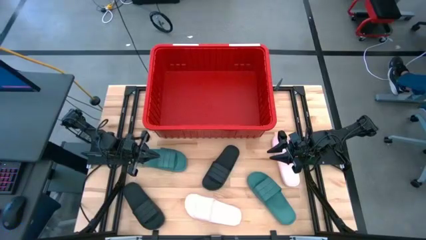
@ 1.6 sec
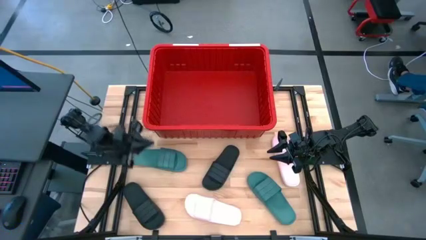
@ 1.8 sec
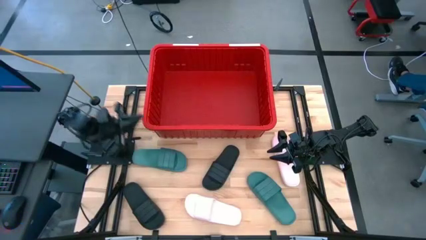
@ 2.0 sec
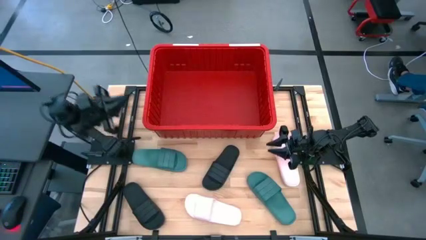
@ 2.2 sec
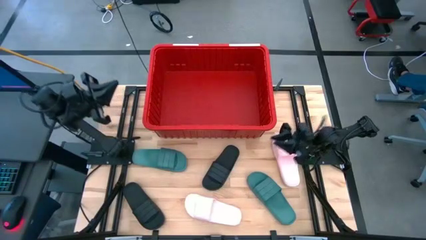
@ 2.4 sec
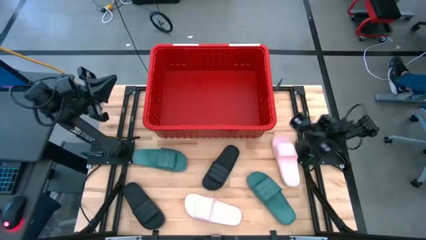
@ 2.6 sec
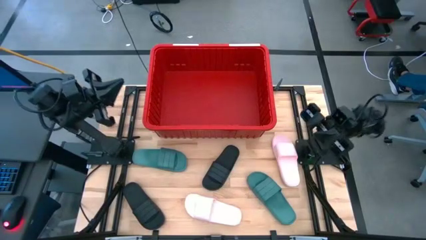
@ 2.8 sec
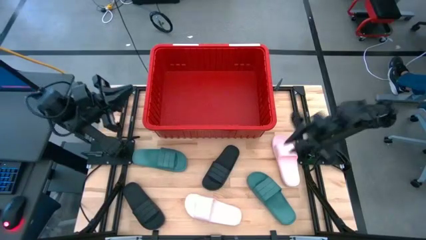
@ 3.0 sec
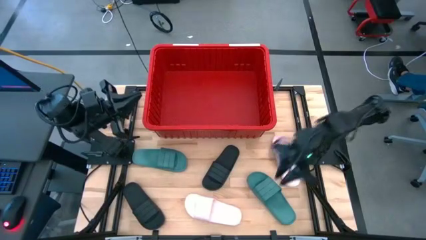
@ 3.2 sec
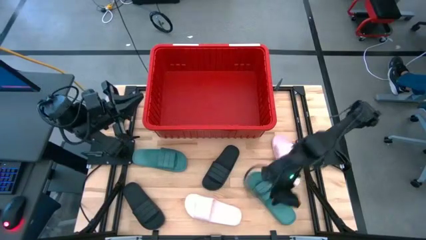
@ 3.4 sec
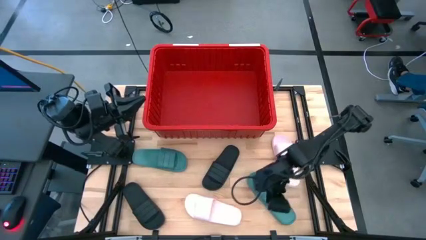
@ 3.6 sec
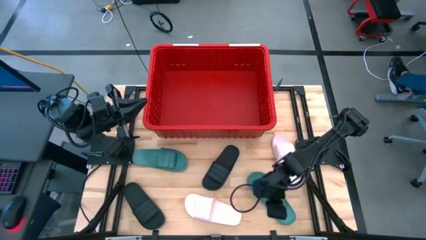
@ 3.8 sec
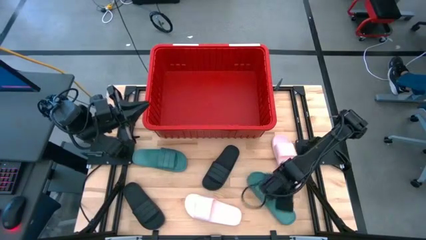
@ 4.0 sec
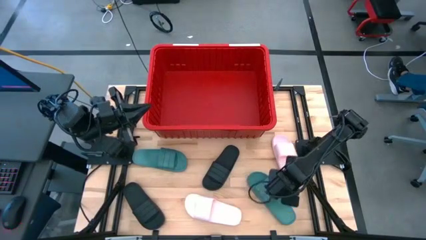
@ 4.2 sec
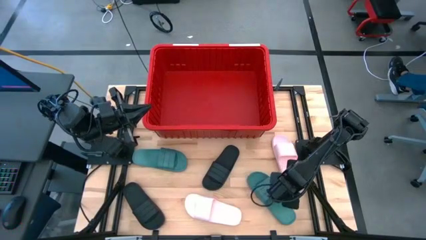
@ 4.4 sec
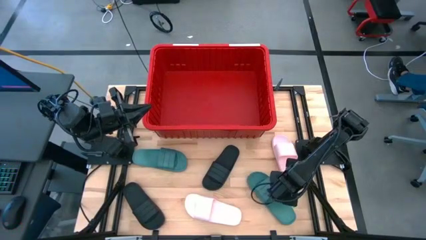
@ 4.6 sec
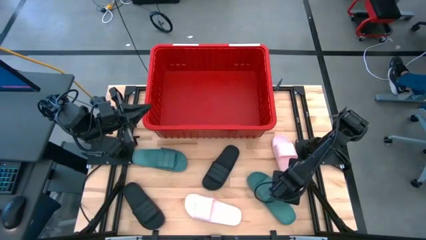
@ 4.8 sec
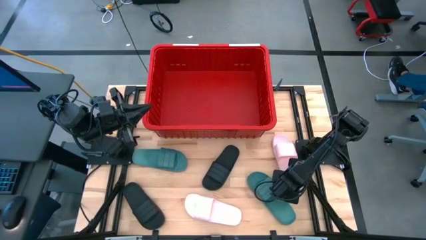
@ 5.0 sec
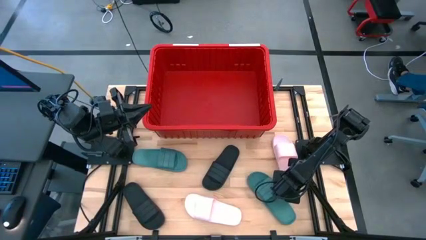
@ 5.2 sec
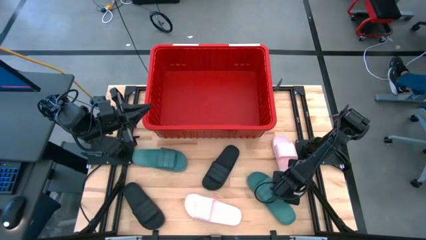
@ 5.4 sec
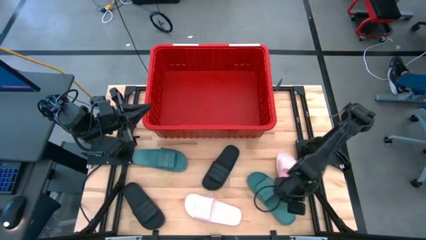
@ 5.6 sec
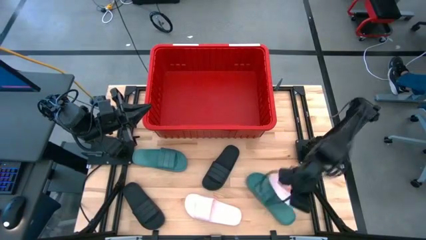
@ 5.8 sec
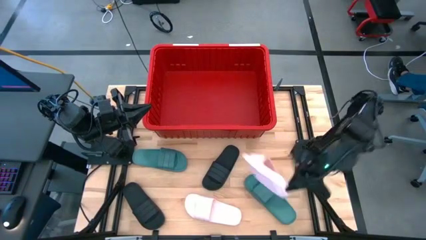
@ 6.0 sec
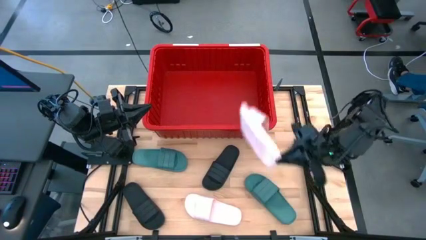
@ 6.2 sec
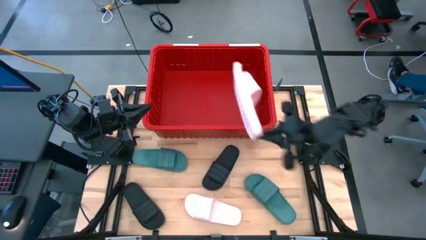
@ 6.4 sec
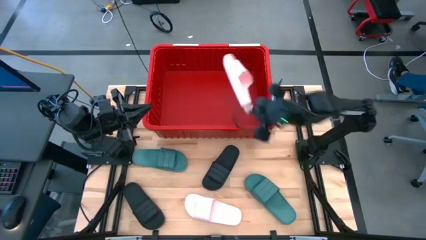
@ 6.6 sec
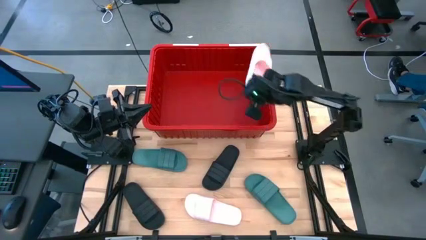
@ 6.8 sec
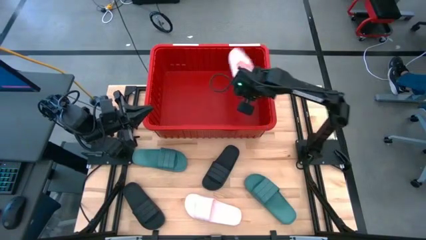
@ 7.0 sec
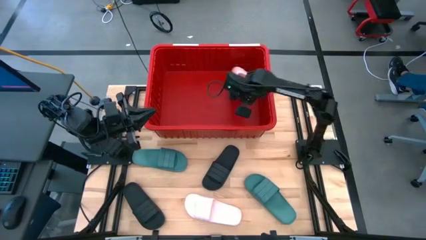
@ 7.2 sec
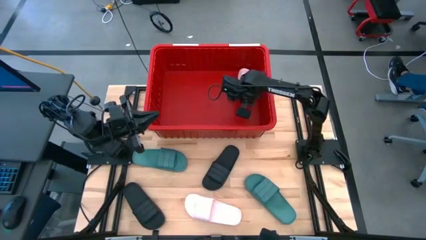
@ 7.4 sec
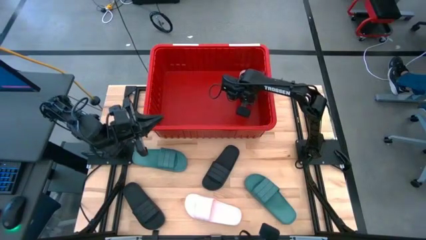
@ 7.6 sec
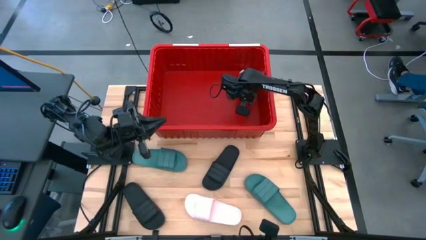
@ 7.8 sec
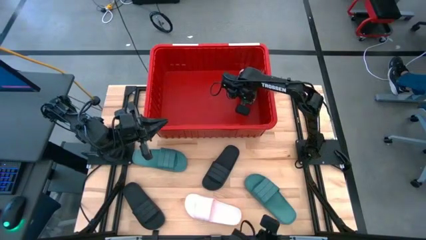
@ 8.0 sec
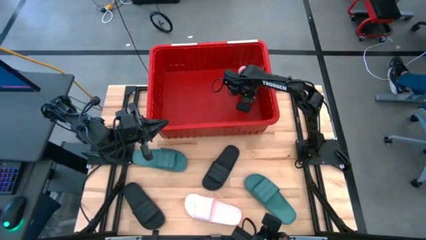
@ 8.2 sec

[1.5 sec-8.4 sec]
Task: Pick and place slides into bin
Put the top pink slide into the red container

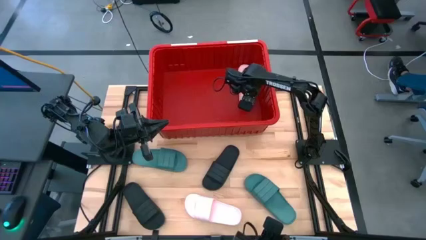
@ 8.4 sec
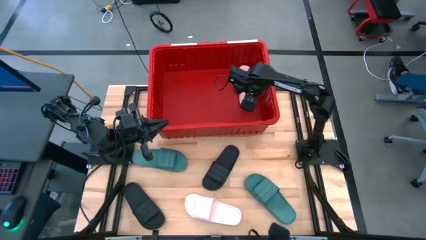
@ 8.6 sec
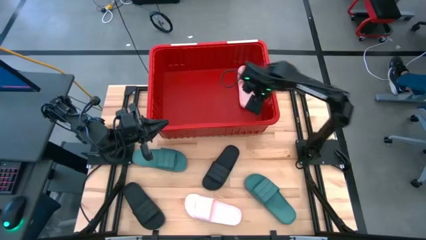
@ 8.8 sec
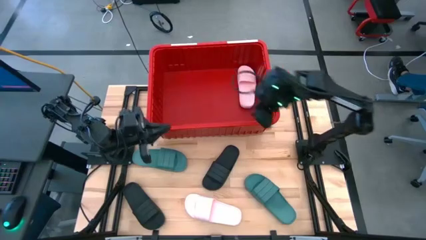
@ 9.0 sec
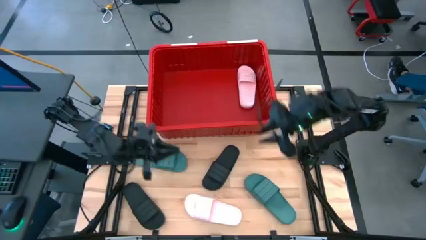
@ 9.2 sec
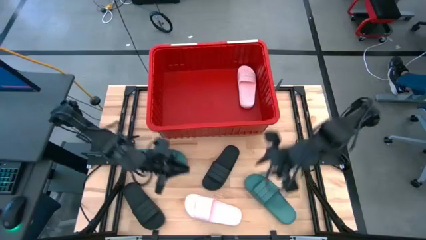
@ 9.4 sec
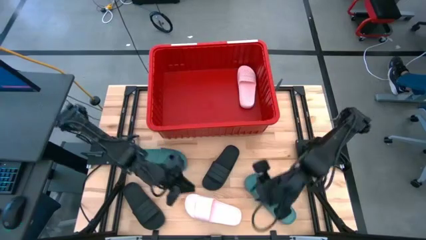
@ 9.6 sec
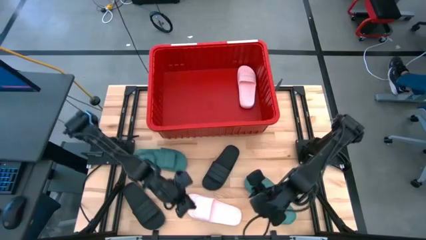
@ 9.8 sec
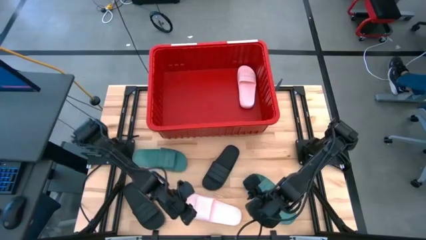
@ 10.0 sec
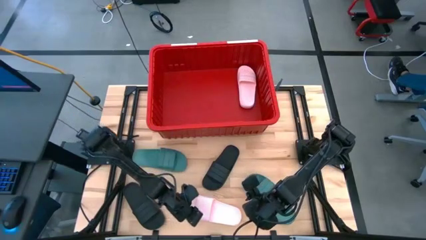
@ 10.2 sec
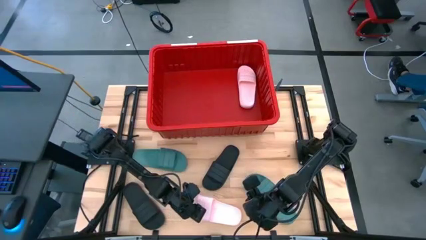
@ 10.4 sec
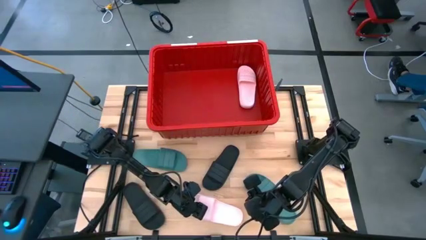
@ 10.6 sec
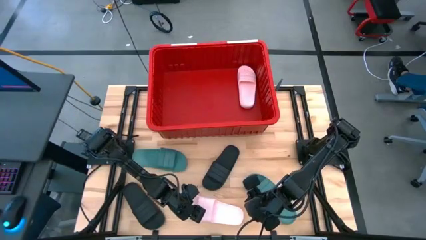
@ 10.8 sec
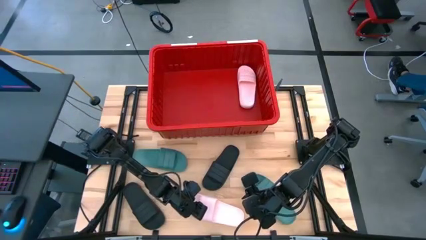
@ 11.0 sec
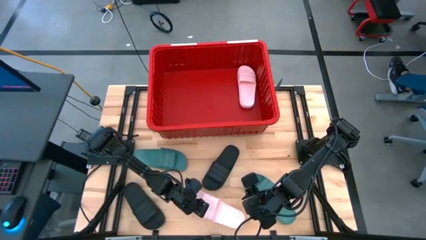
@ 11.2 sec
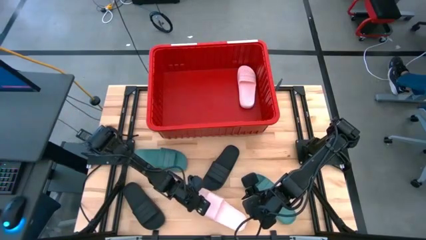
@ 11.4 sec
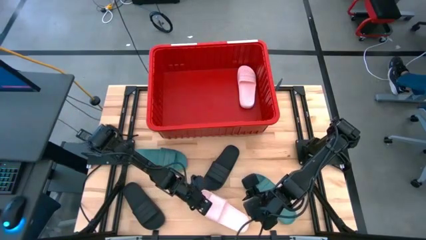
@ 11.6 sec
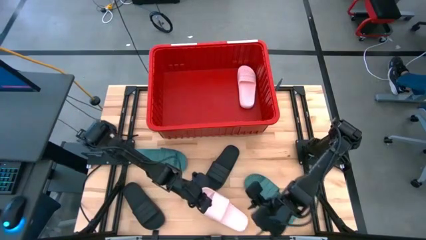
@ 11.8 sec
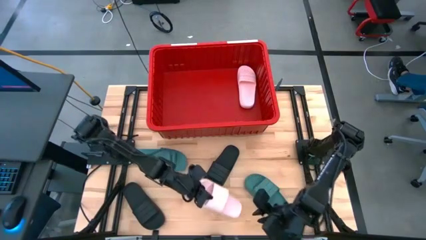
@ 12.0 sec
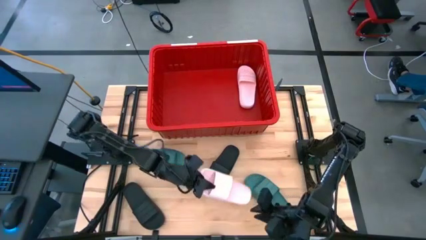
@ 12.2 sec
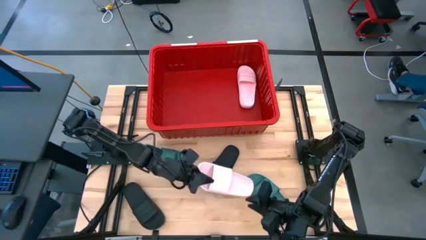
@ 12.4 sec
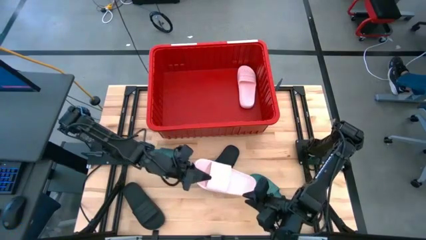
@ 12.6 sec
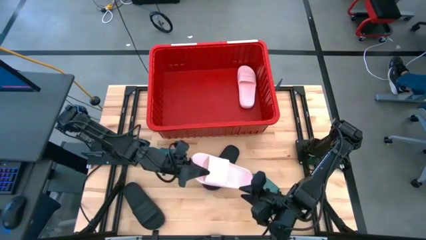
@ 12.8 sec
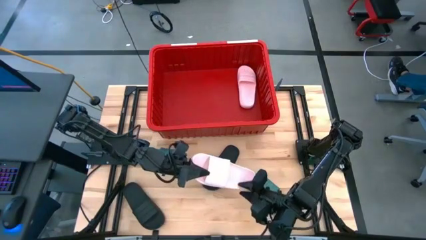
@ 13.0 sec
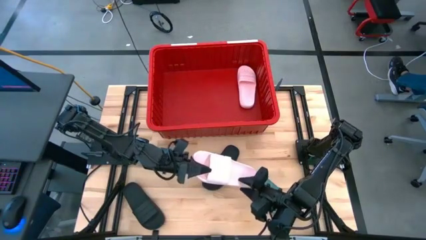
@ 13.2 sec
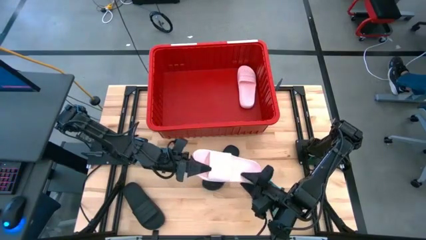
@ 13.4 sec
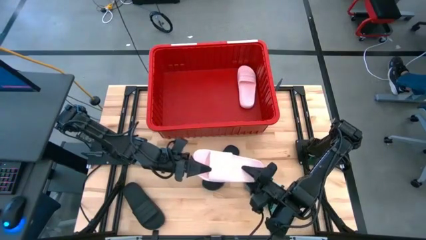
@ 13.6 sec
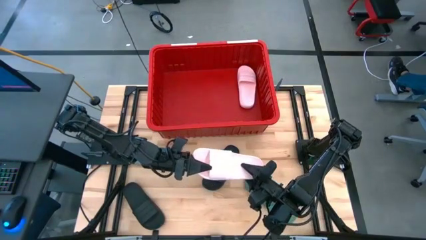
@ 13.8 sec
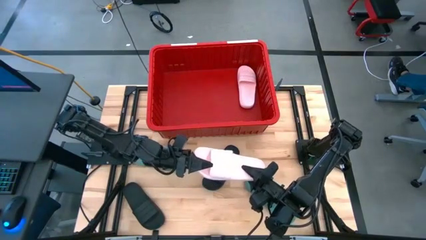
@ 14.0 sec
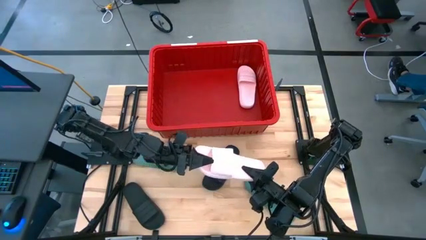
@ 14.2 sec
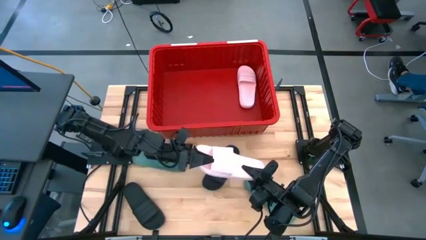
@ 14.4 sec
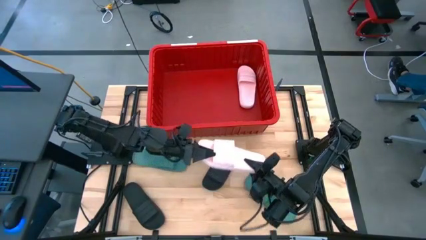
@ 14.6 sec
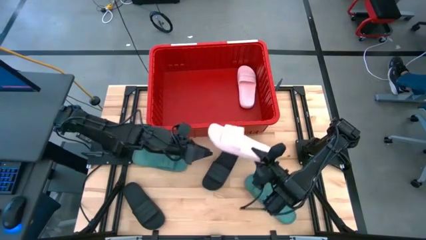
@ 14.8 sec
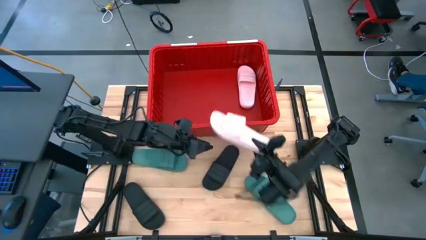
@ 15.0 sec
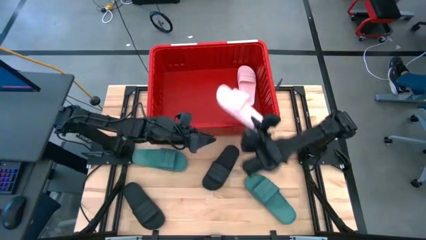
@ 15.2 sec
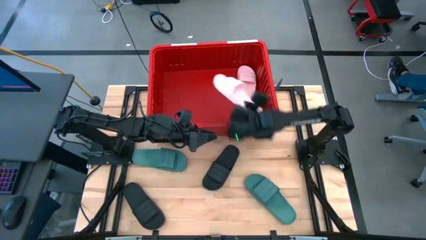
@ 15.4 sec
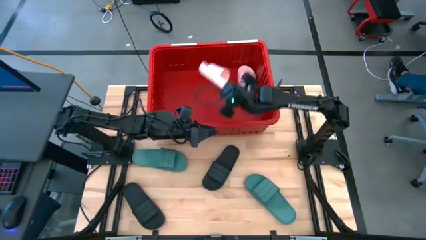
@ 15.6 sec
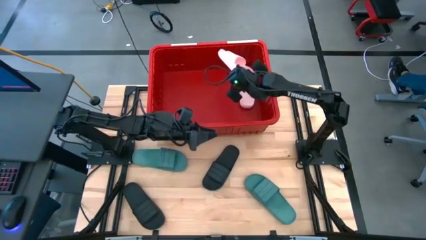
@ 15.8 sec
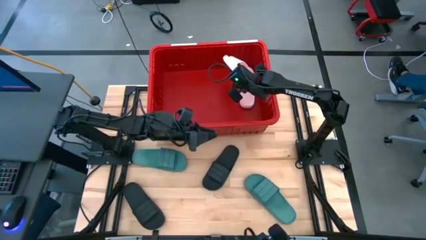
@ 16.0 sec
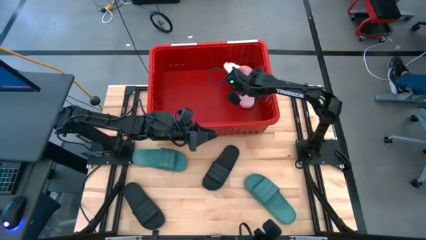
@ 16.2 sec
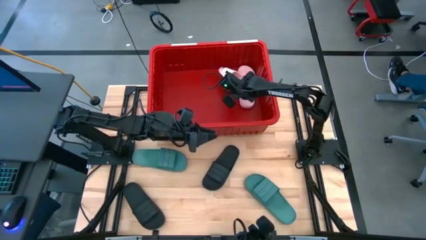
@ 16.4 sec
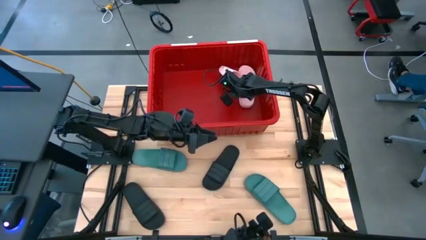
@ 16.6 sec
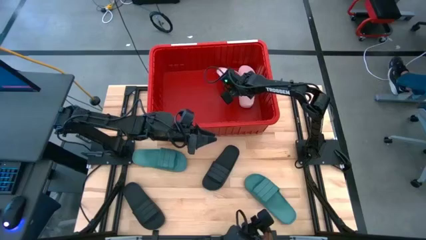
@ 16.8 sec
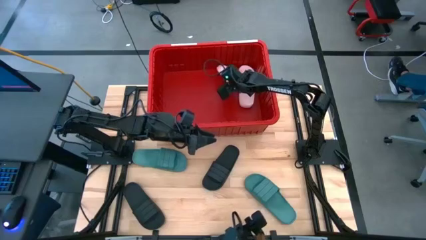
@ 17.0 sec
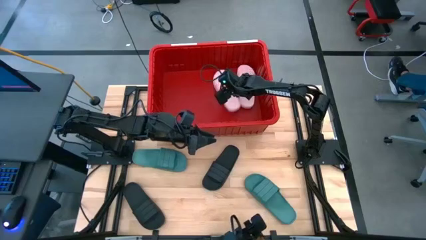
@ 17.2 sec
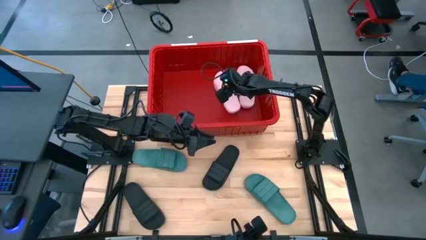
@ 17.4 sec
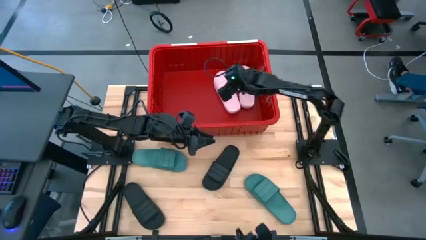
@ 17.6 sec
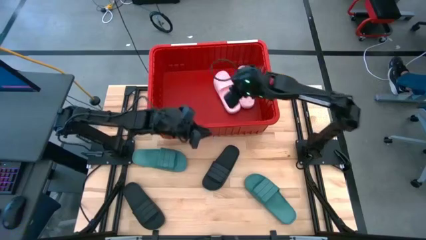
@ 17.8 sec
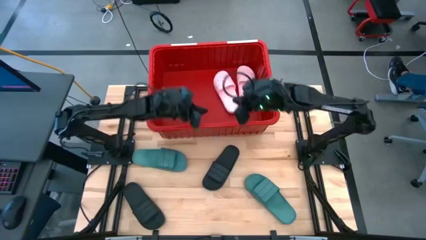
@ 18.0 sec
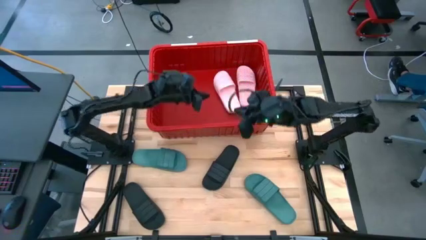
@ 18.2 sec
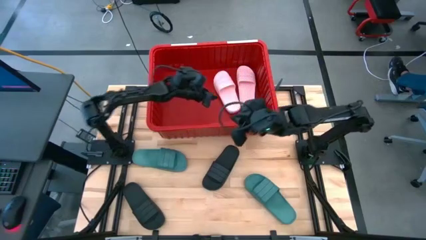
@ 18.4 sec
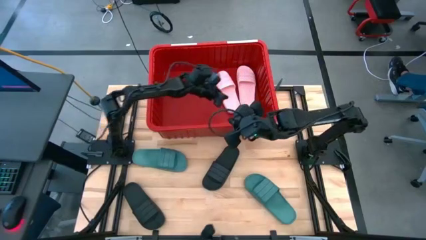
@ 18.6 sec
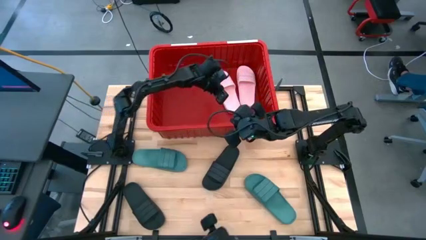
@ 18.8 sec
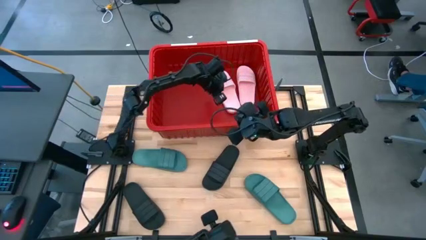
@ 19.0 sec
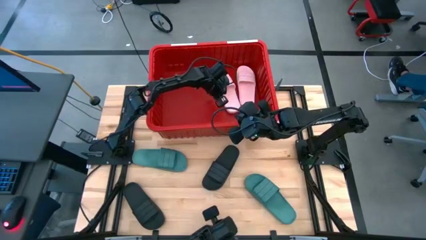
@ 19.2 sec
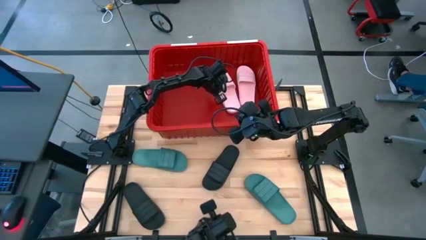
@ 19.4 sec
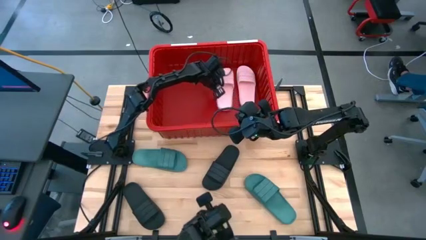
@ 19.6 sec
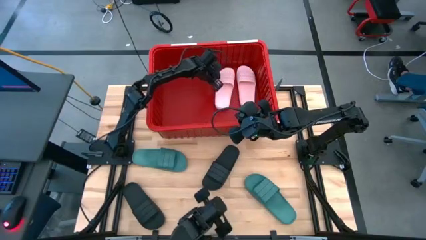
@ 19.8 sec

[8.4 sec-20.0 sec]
Put the pink slide into the red container
